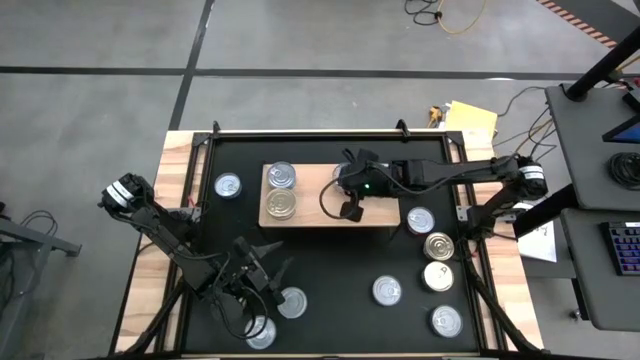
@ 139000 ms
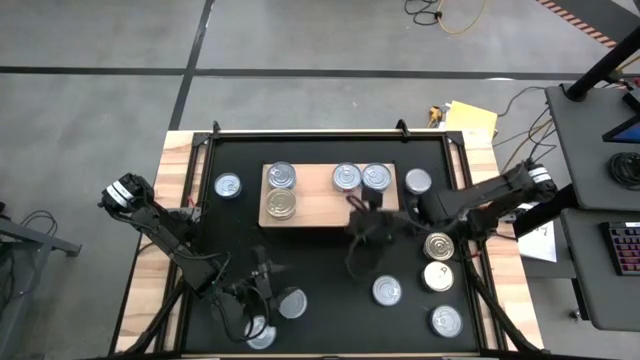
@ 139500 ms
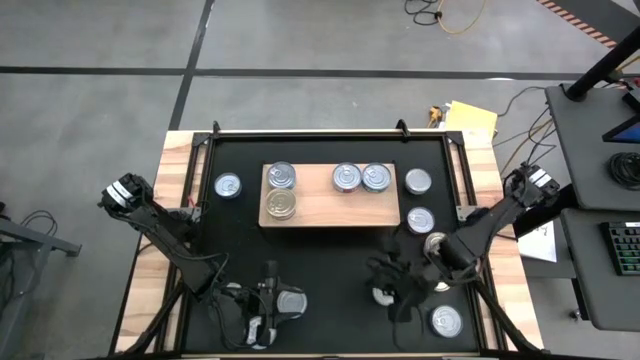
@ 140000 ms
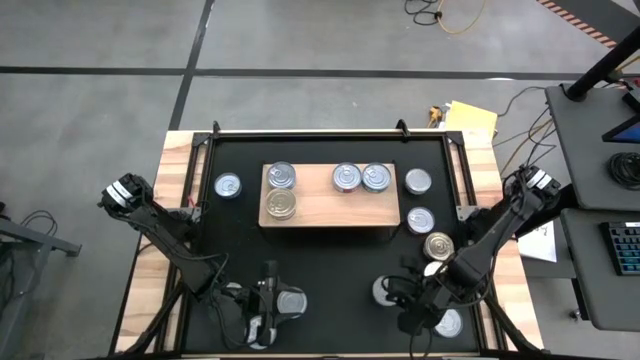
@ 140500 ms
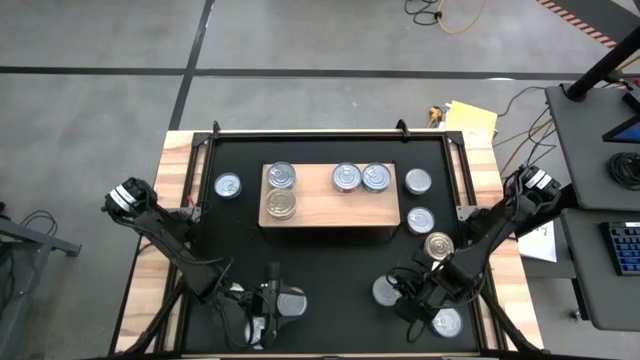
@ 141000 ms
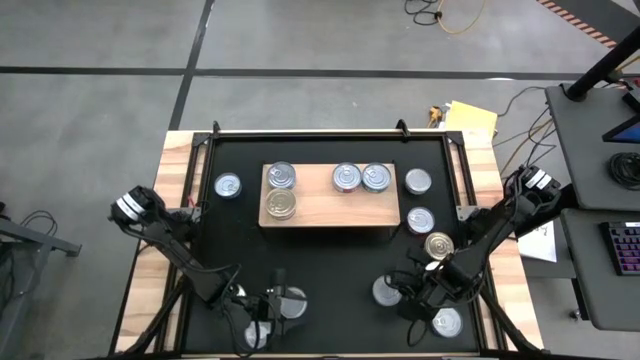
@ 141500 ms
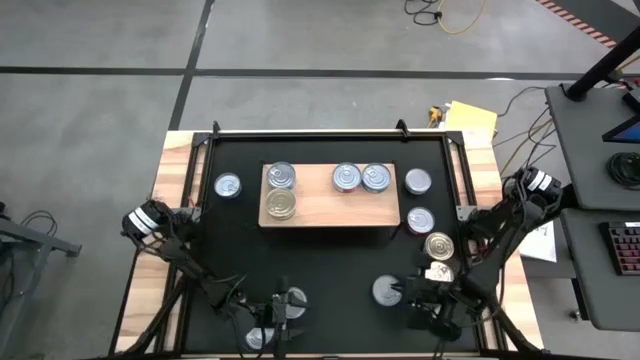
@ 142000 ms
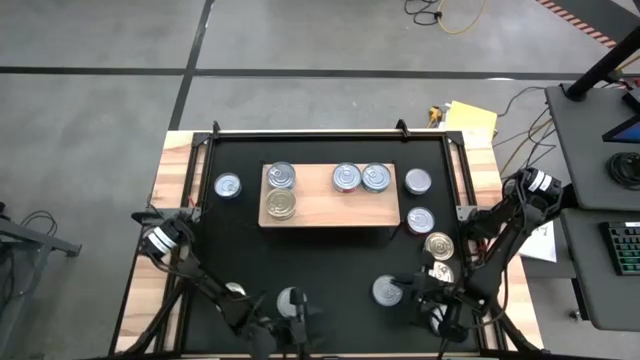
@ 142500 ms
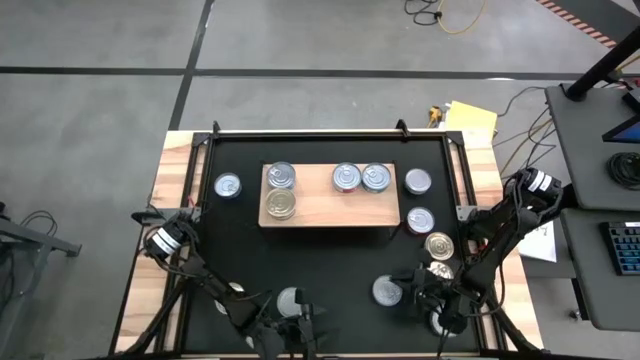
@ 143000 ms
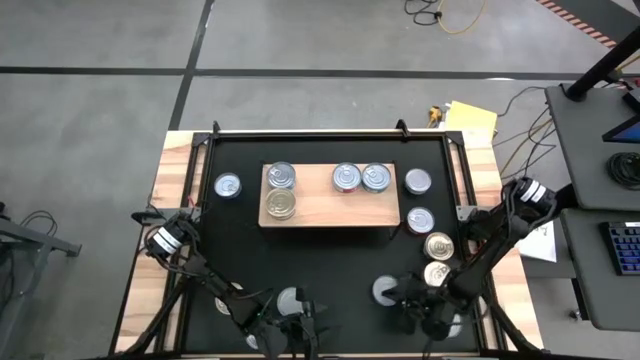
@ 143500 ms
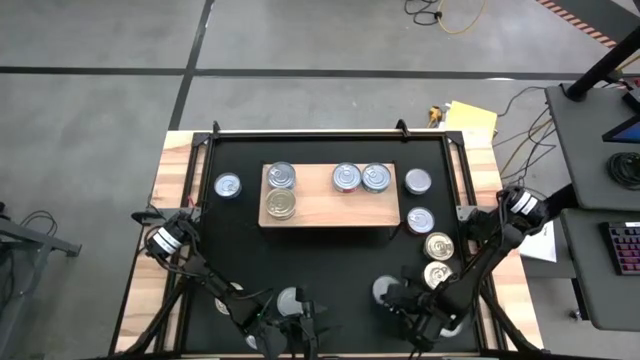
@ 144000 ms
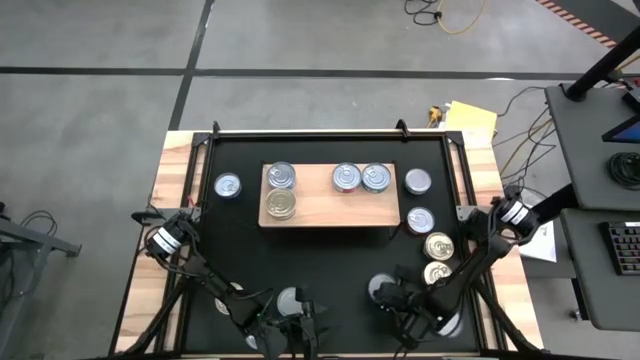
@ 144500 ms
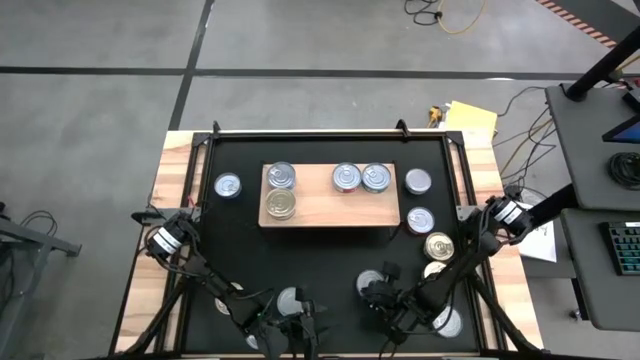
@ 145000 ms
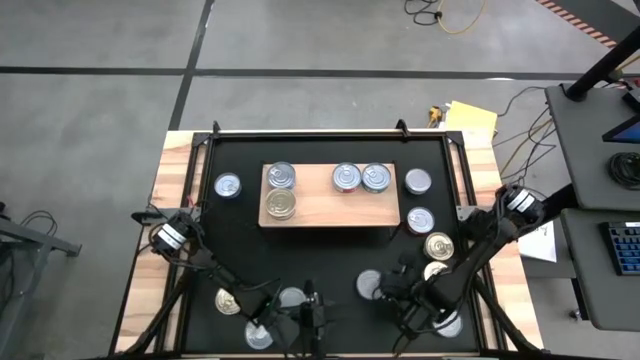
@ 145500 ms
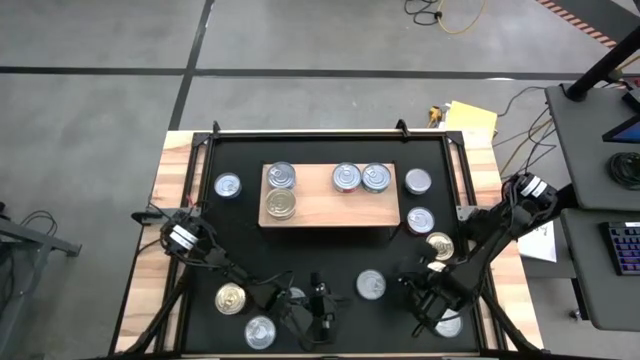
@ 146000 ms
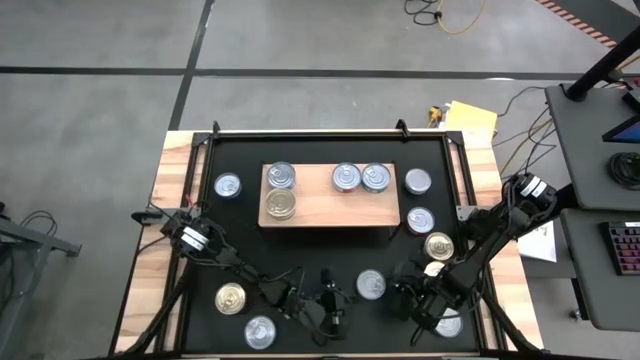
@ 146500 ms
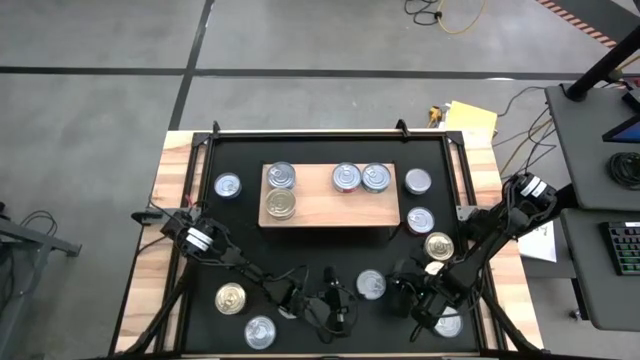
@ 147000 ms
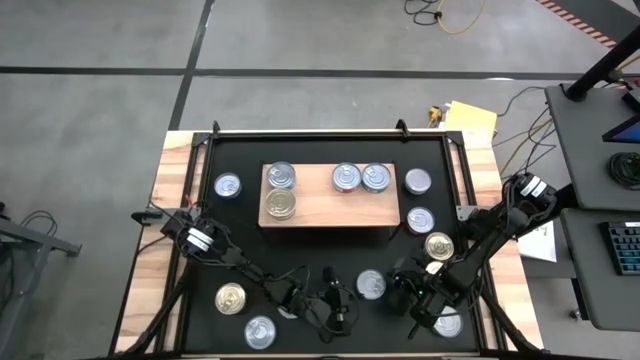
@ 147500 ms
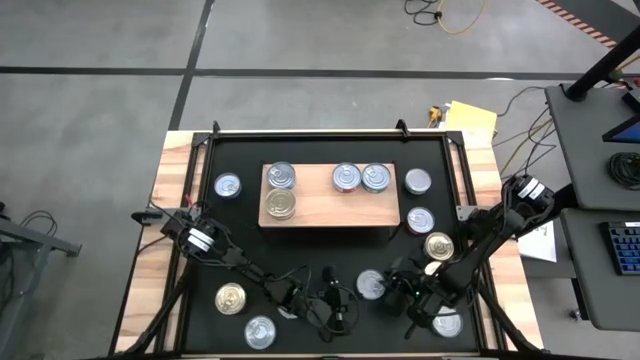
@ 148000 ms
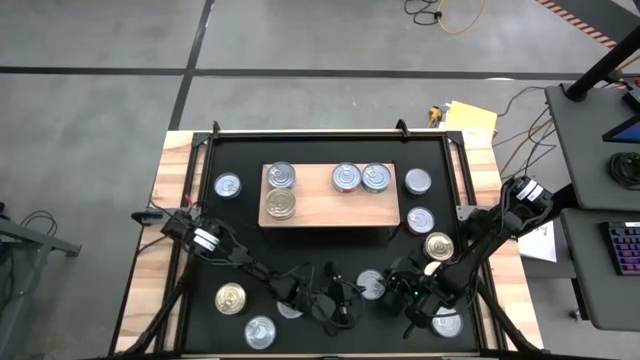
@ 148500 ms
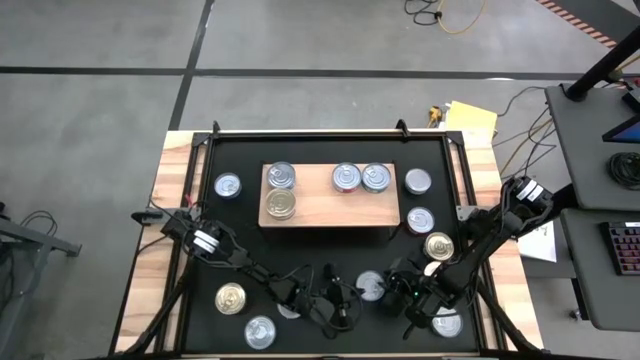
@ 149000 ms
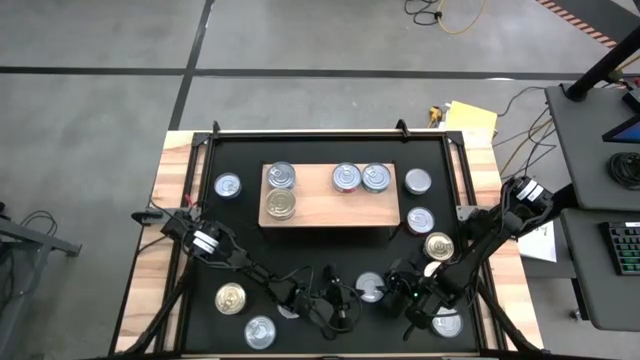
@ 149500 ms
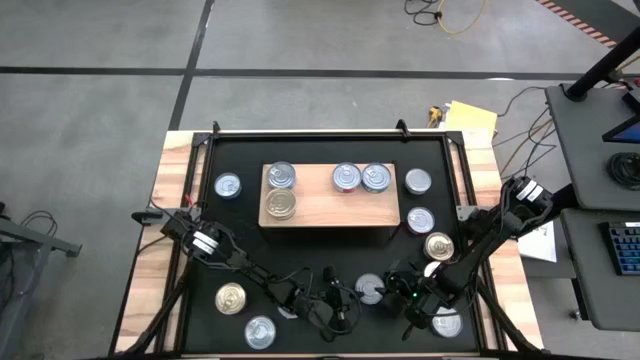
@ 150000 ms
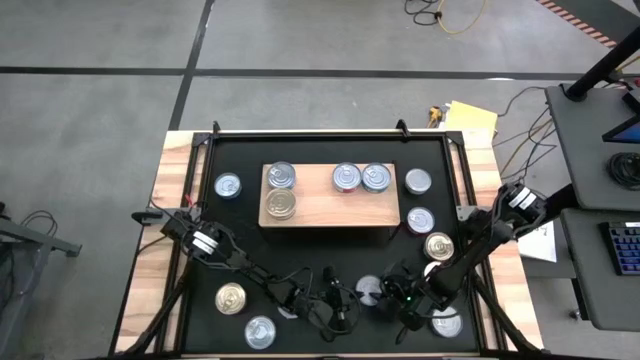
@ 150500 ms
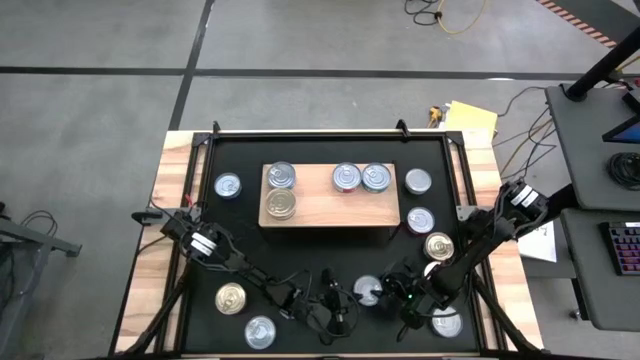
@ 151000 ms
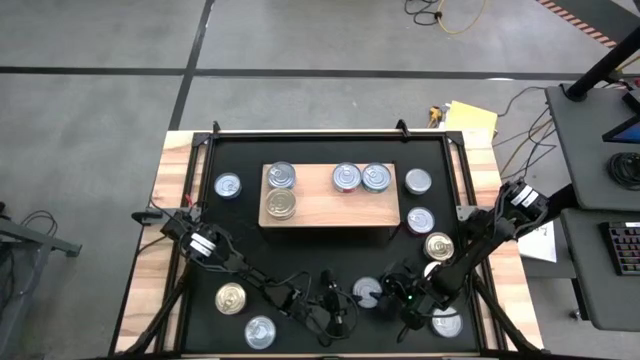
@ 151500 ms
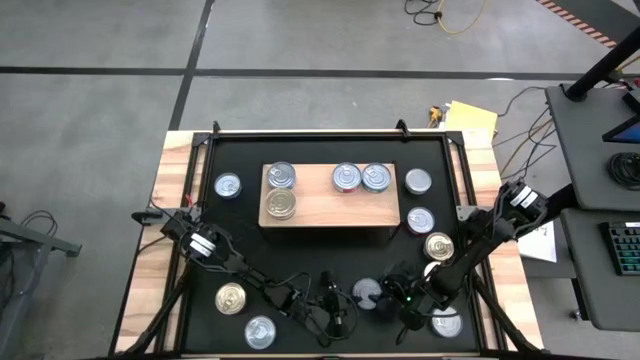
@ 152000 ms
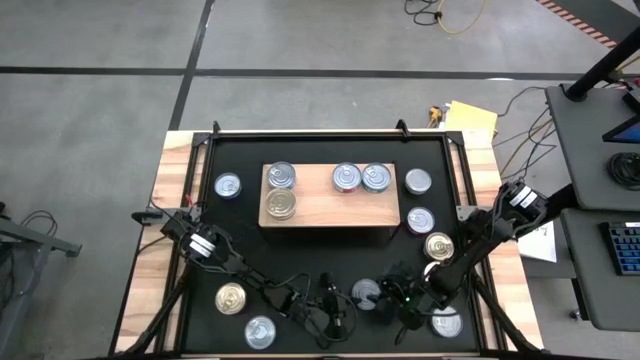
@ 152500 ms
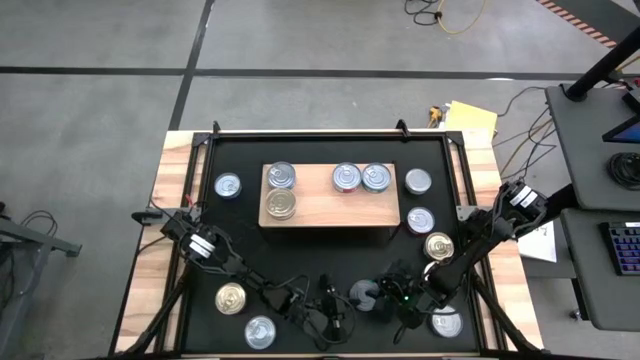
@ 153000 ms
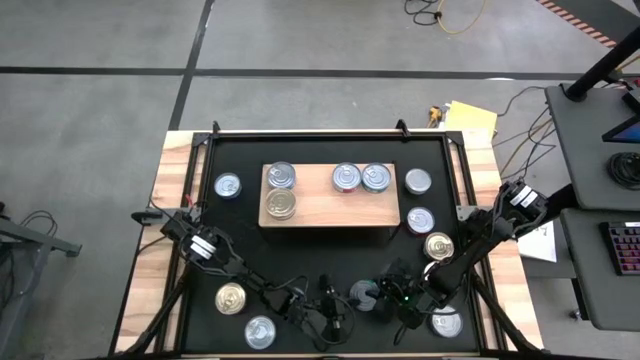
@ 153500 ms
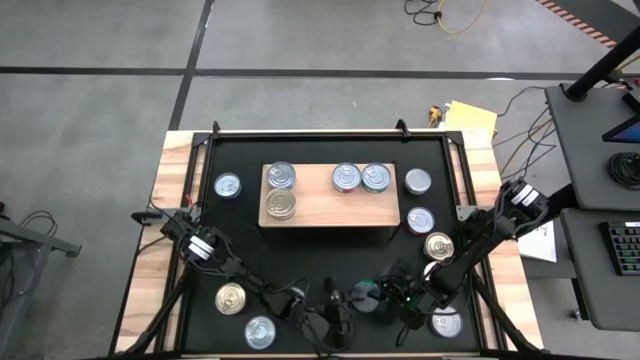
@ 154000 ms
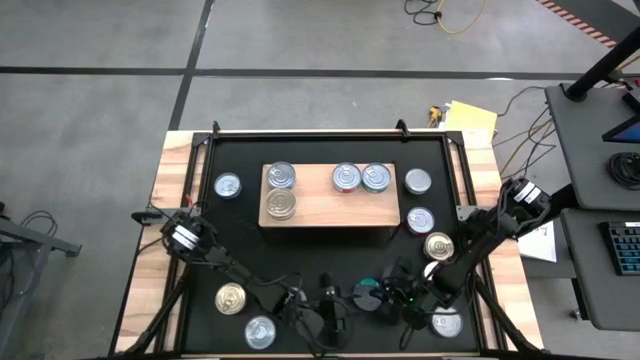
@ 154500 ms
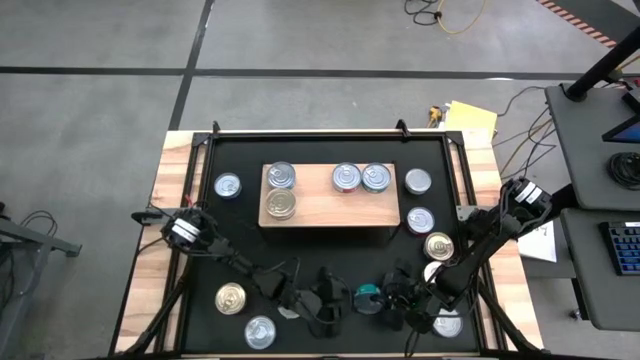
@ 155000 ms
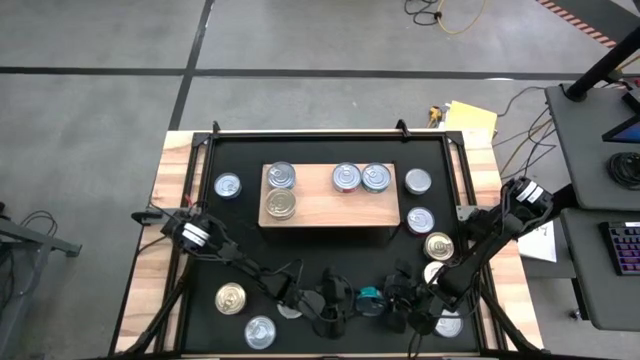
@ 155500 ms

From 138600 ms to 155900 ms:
Task: Stack canned seafood by type on shelf
Stack the light green tuna can on the light green tuna can

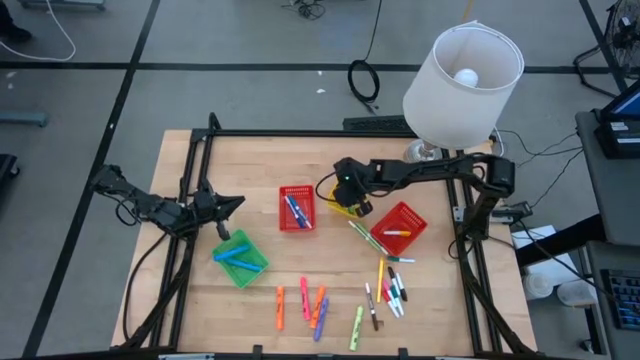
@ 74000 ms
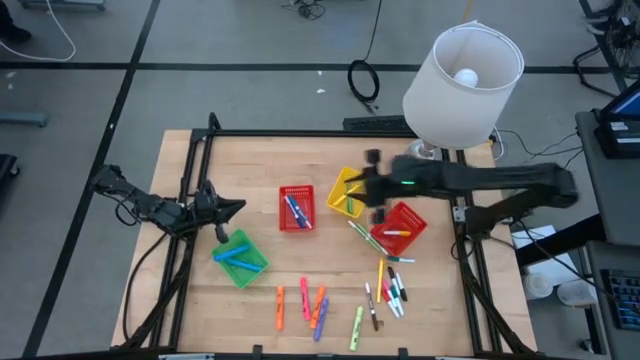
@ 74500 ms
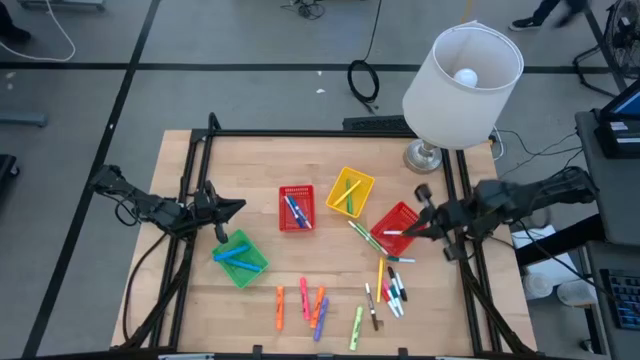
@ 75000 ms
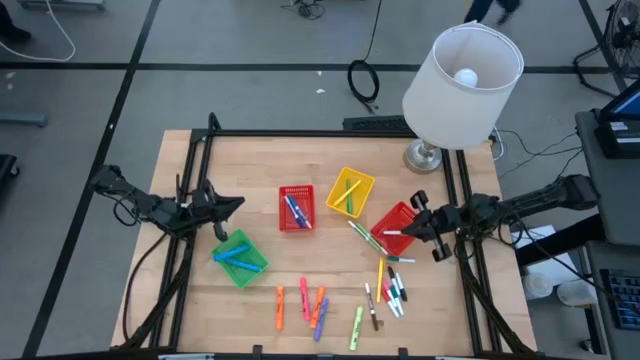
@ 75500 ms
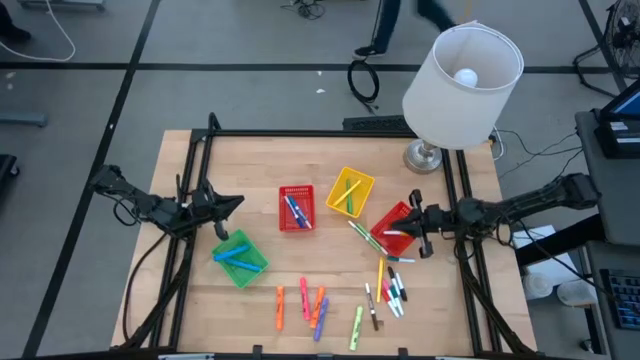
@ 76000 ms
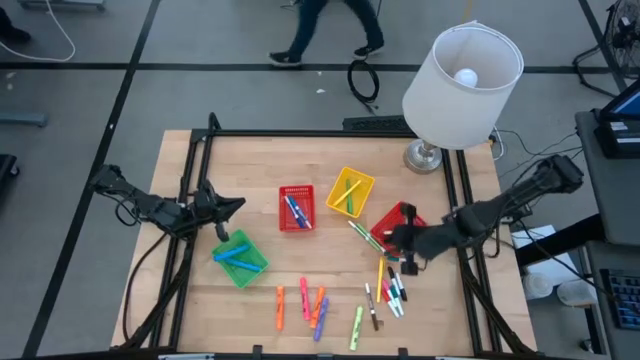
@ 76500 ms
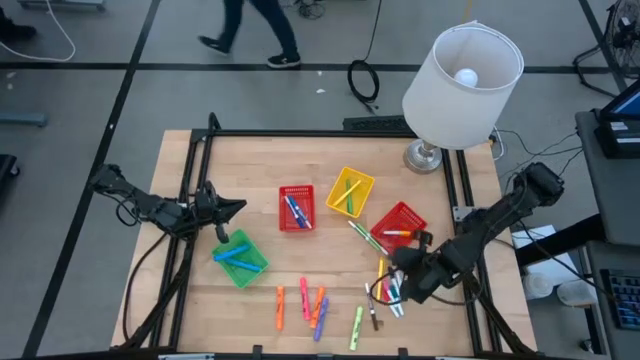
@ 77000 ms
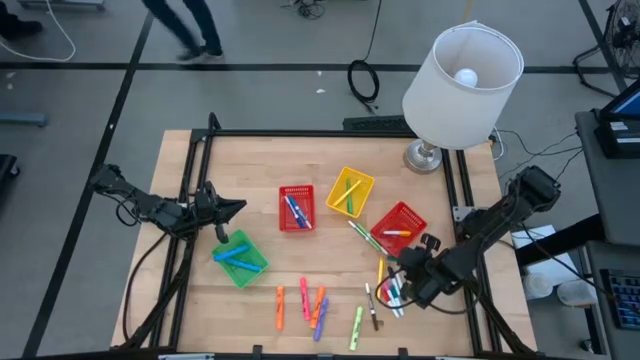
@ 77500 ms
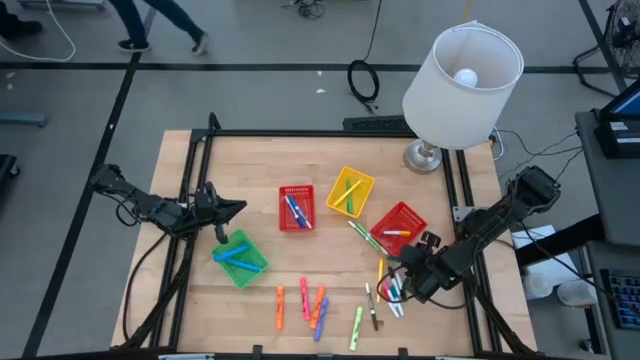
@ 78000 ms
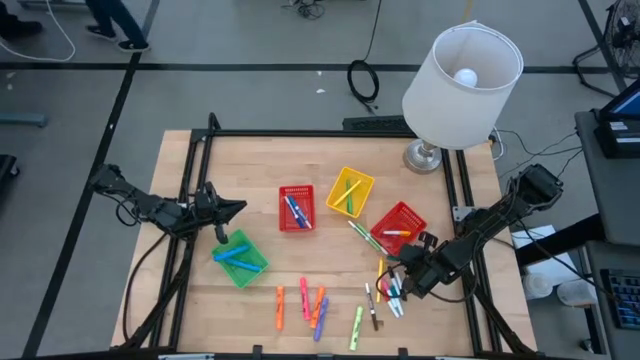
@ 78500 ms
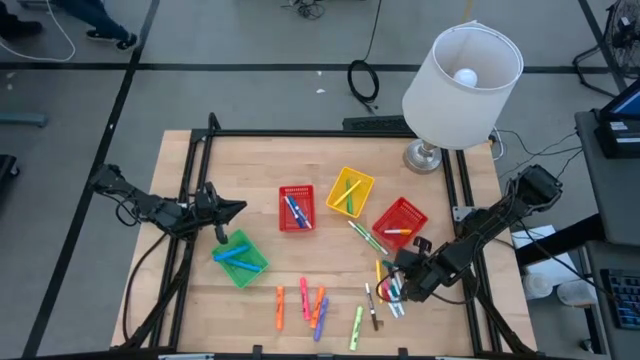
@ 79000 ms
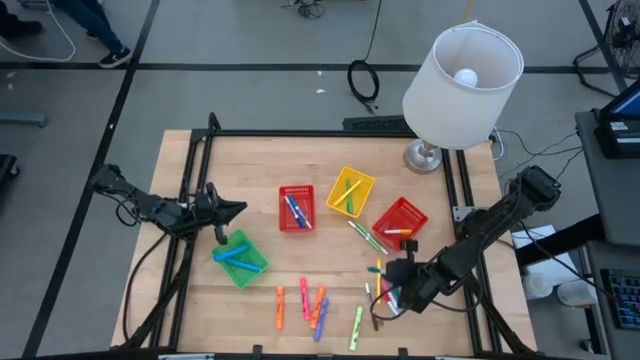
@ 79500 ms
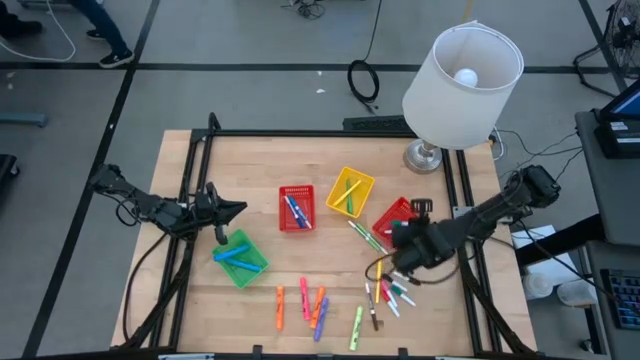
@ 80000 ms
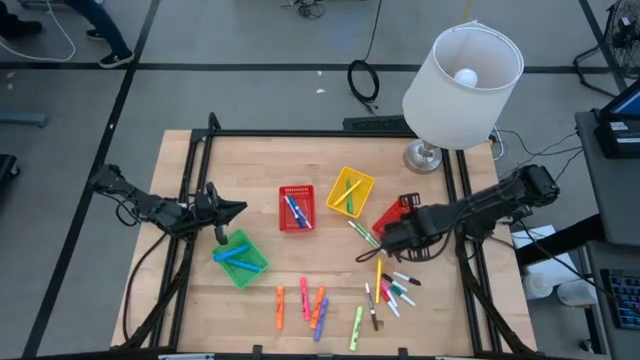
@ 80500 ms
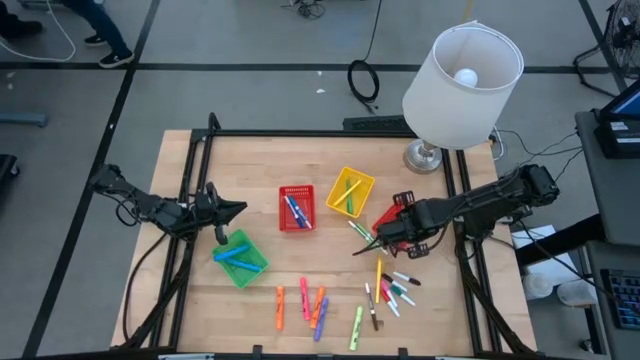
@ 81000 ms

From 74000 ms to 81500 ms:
Task: Pick & Place Markers
Put the top small green highlighter pen into the right red bin
